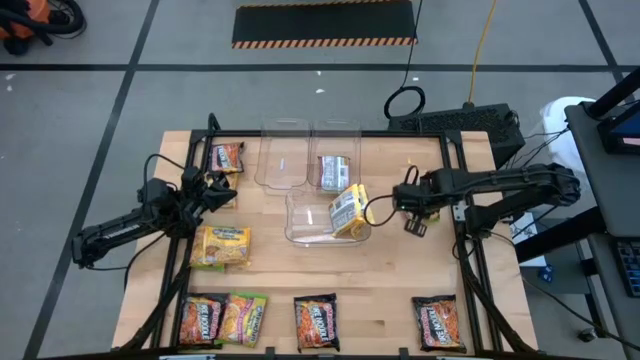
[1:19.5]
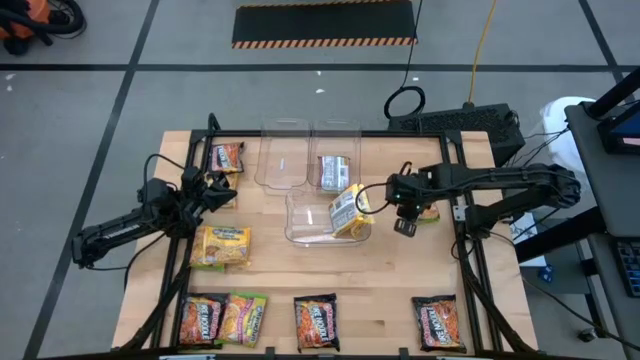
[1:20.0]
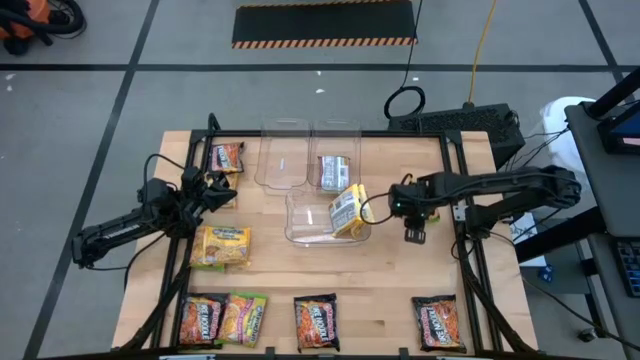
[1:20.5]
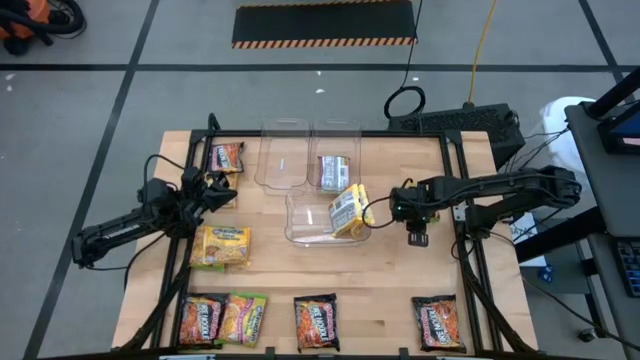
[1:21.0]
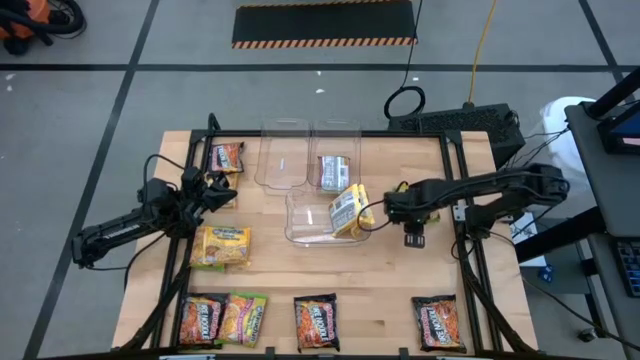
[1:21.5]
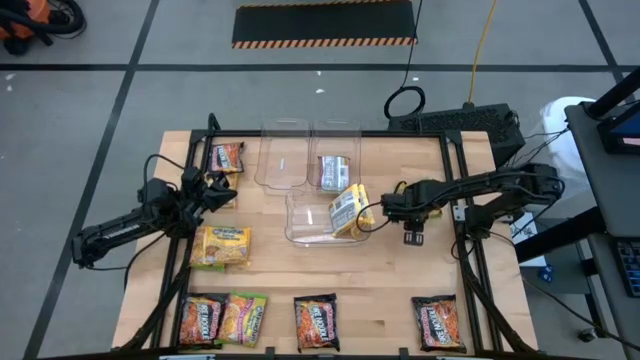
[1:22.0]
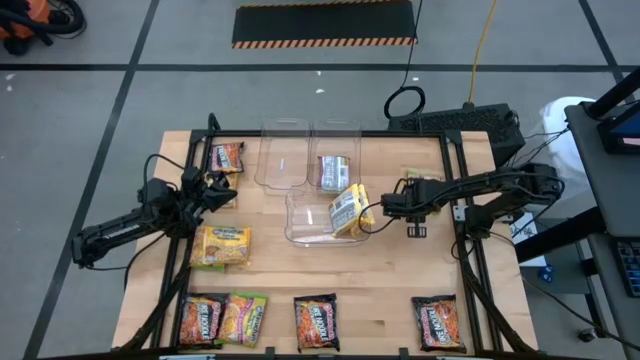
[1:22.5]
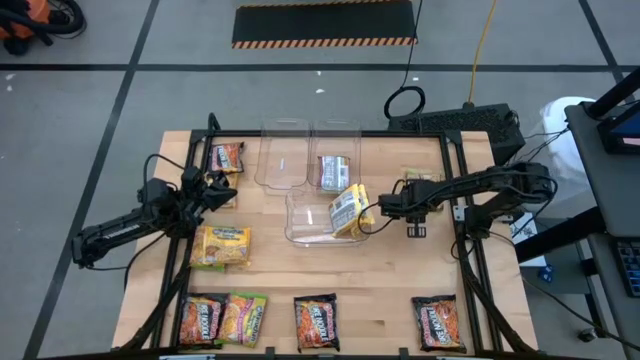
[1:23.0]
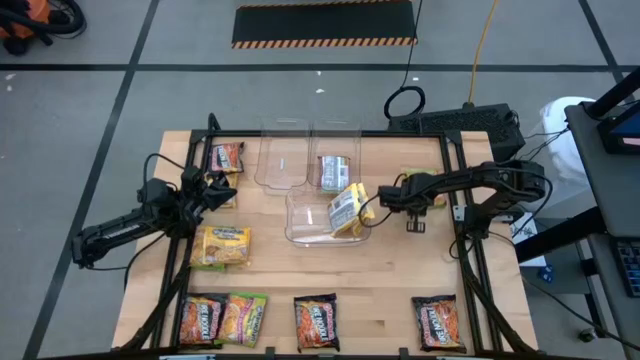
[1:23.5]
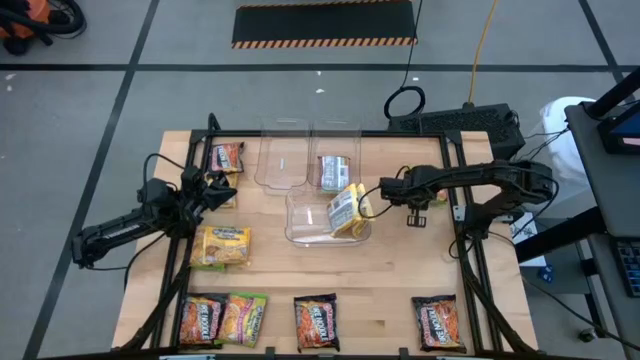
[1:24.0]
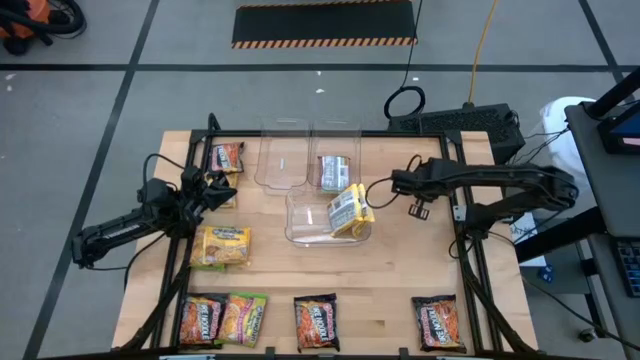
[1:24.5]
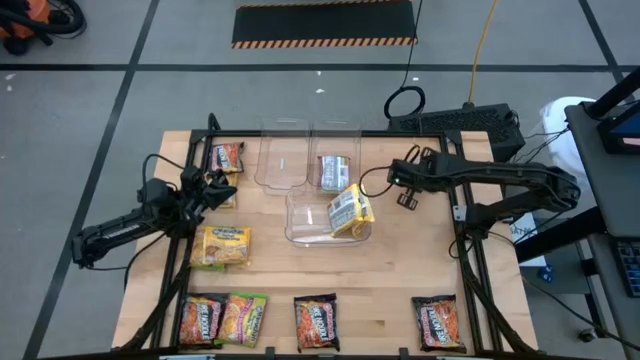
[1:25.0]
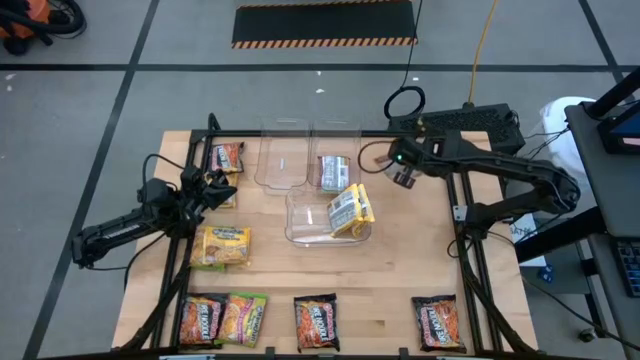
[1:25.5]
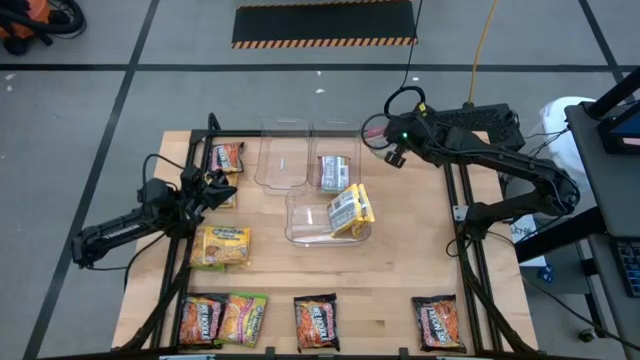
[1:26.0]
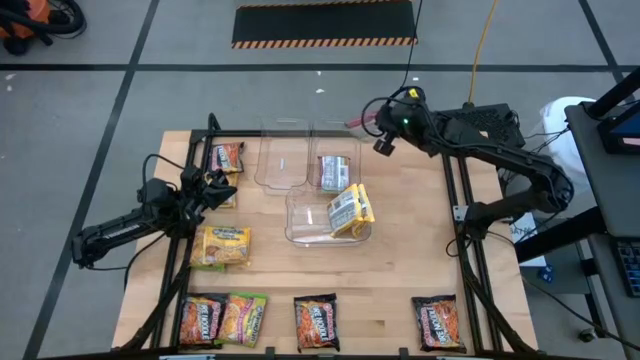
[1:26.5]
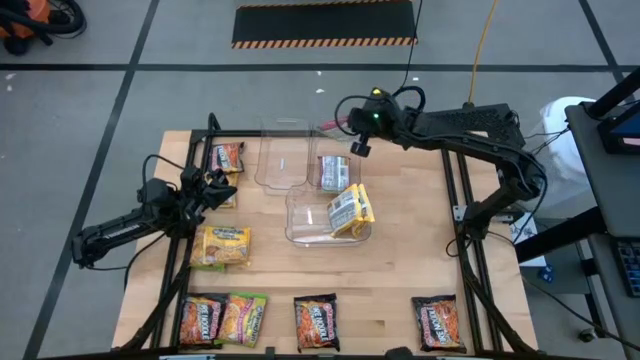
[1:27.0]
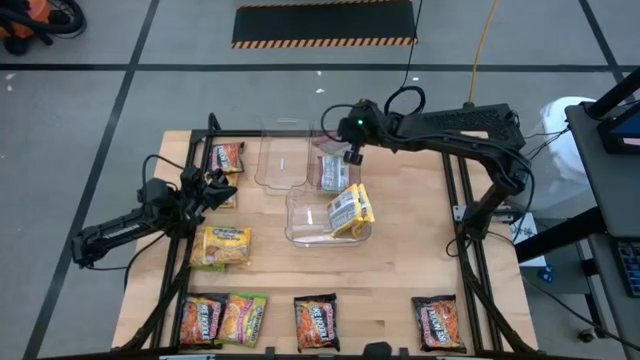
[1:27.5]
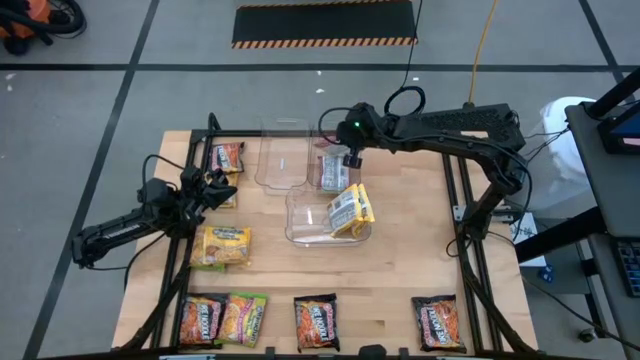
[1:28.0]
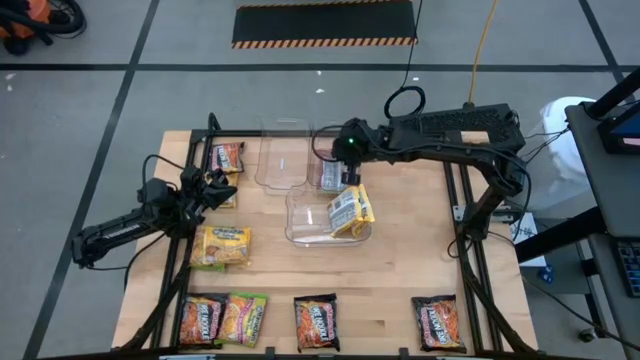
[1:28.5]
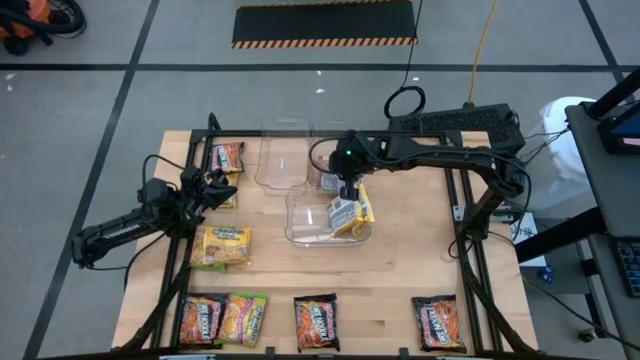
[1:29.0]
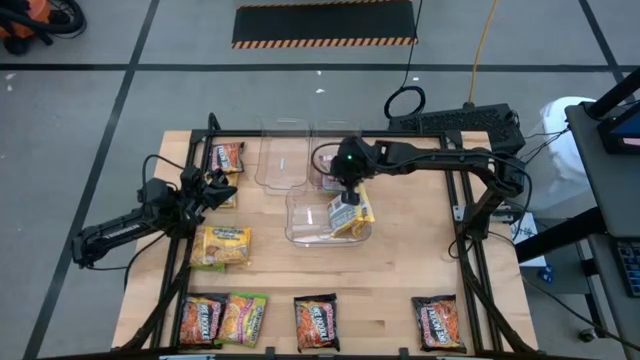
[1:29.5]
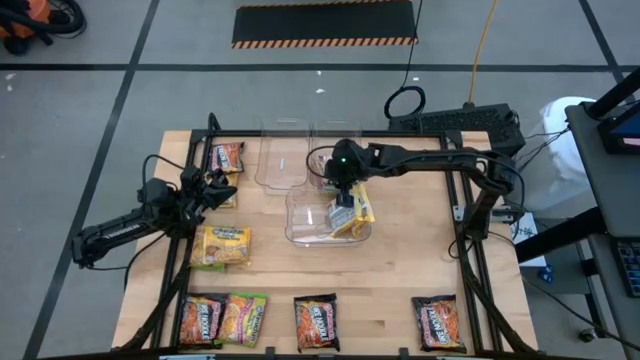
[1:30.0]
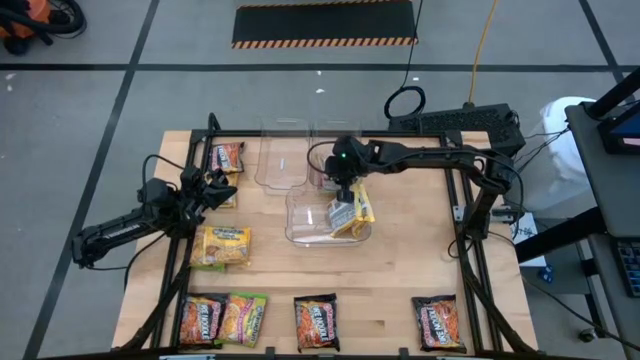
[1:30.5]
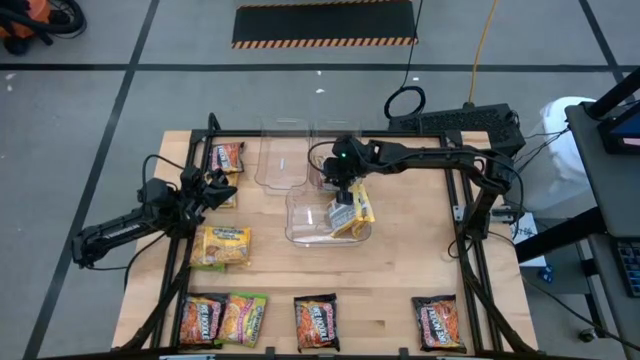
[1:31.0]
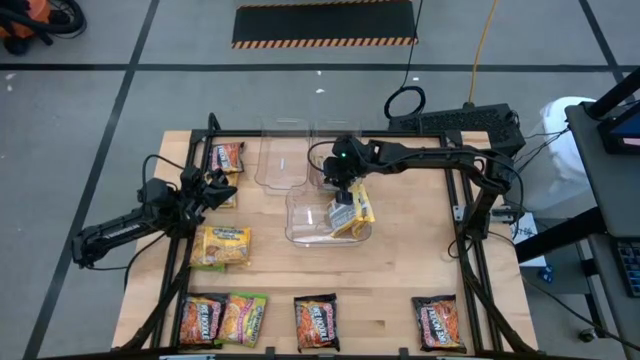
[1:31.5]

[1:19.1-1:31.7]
Task: Sort Maruchan noodles
Put the green noodle pack into the top right transparent bin
